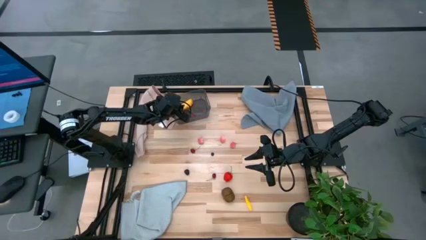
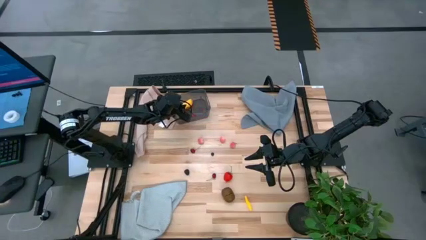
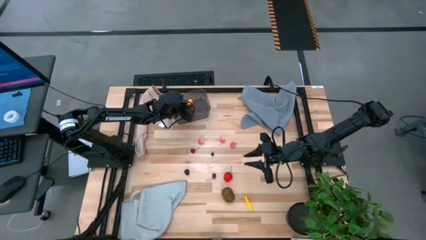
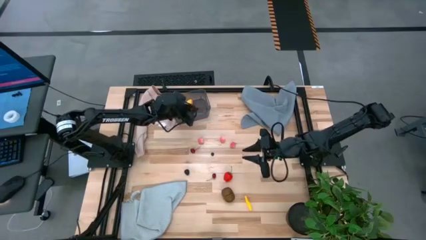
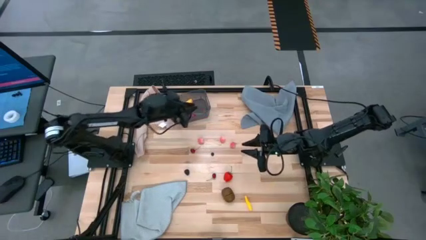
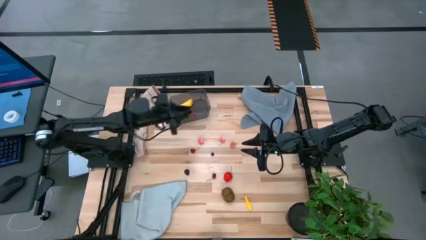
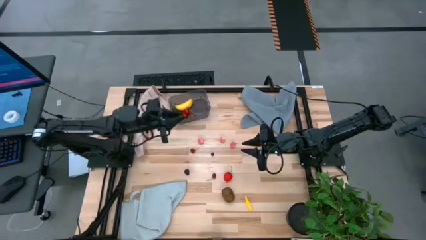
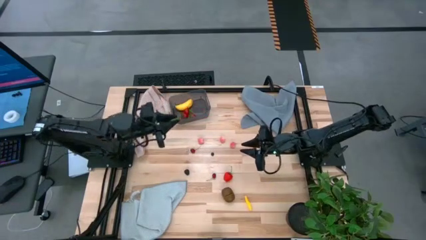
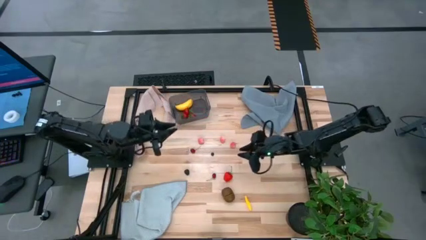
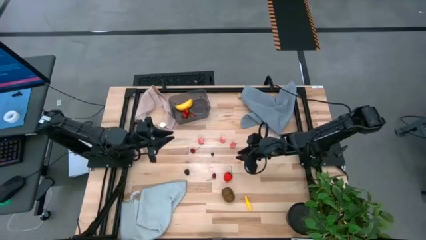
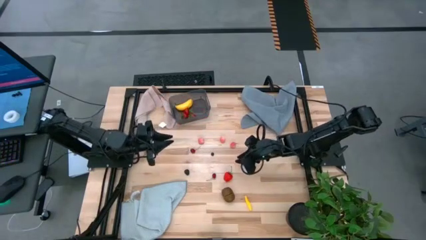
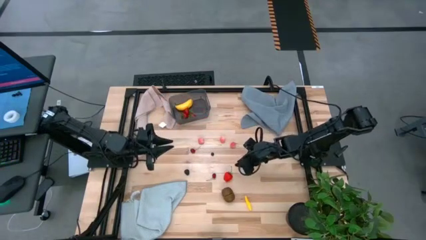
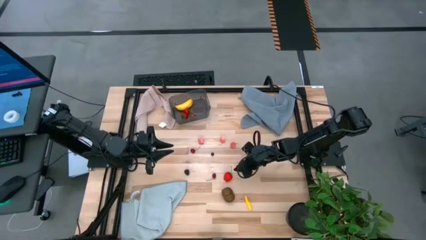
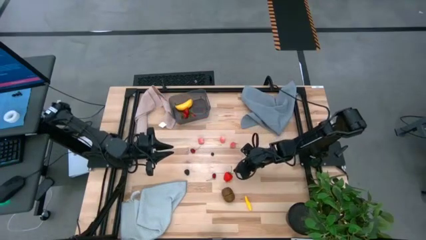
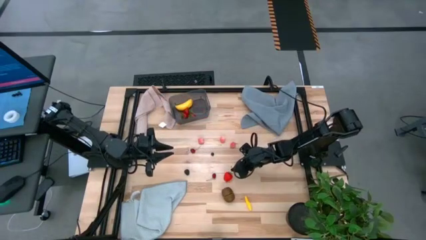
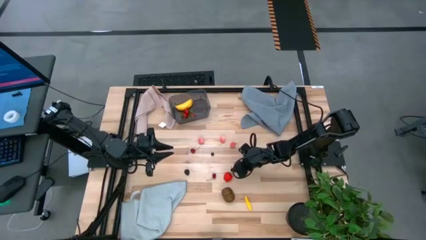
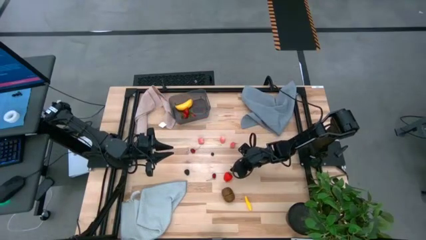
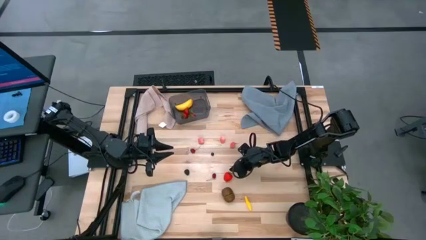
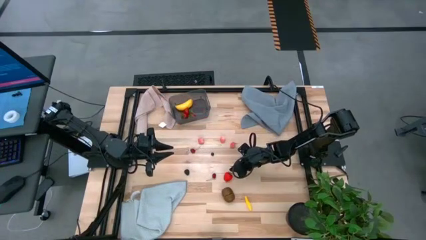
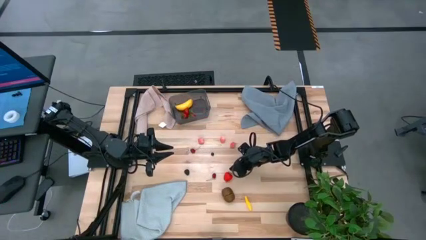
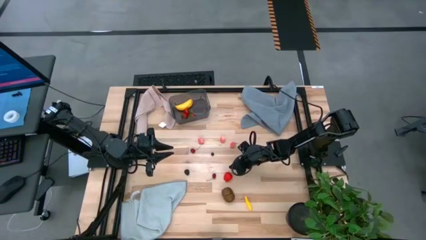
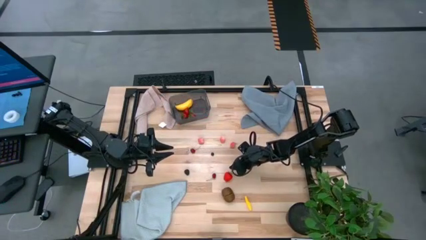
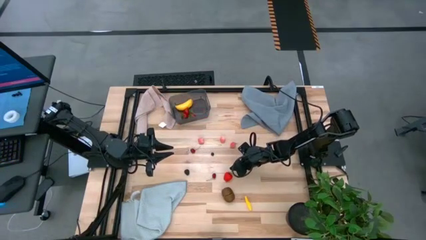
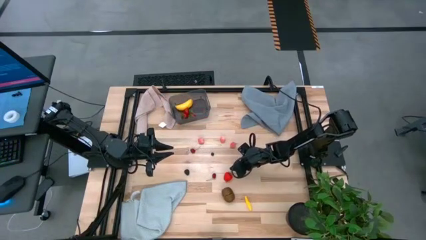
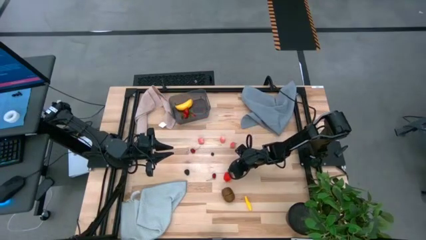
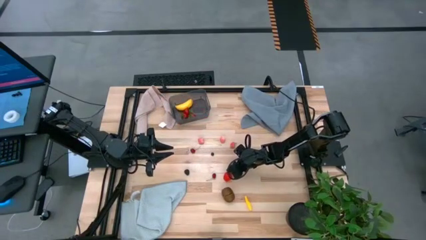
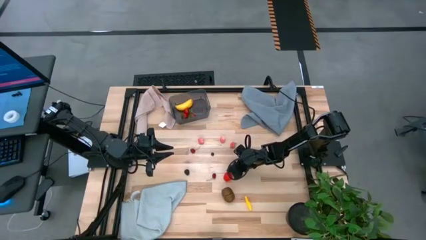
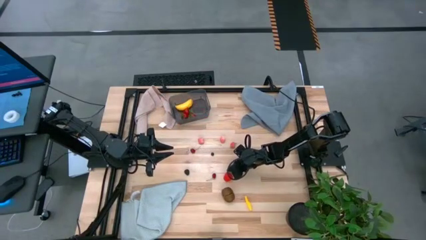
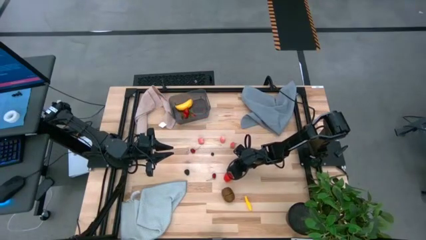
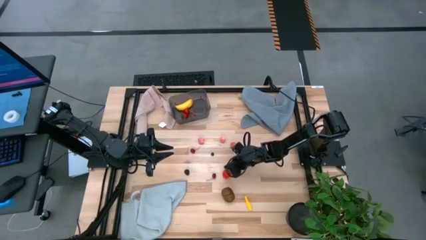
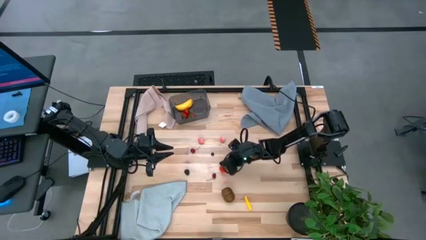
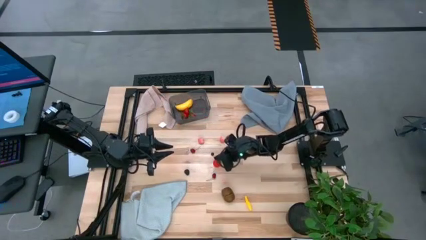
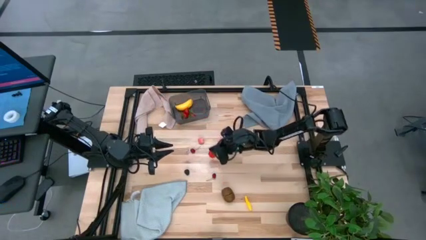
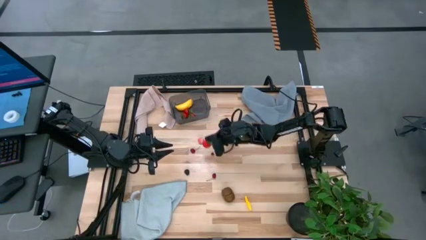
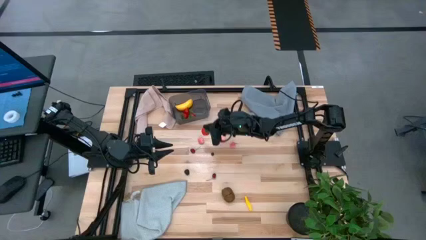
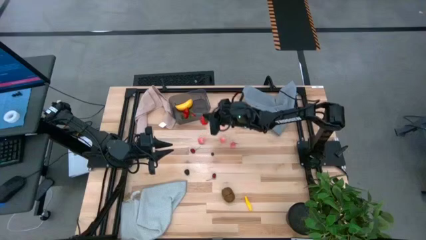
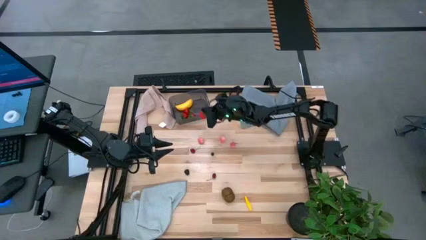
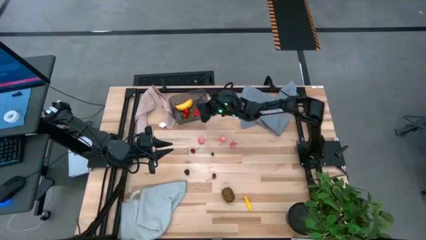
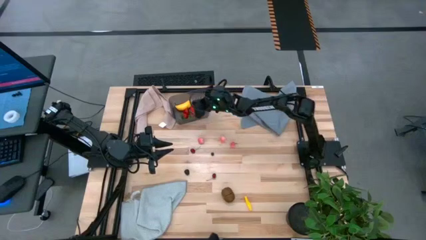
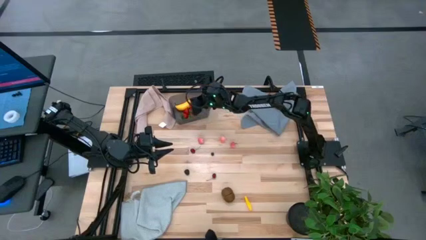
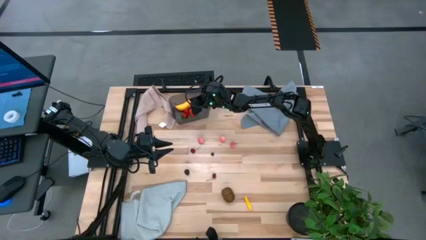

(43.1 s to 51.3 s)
Task: Pick and placing Produce into tupperware
Put the red strawberry into the black bin

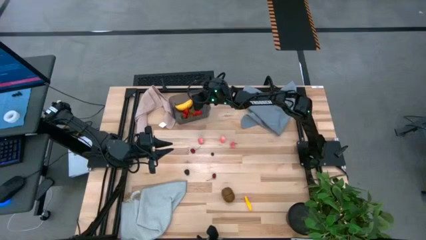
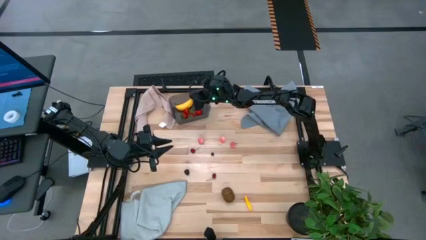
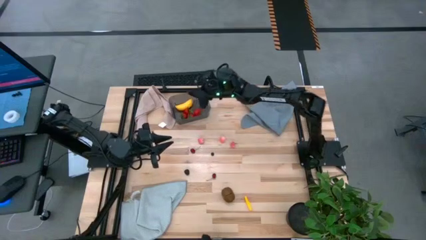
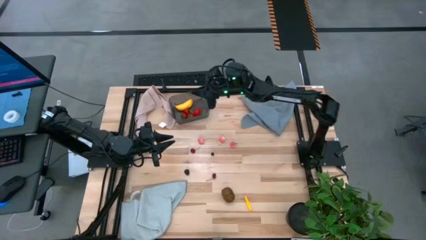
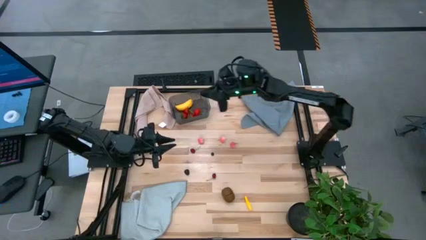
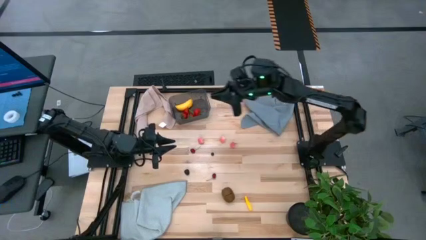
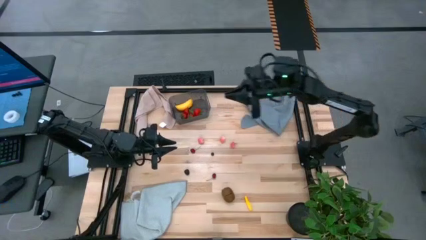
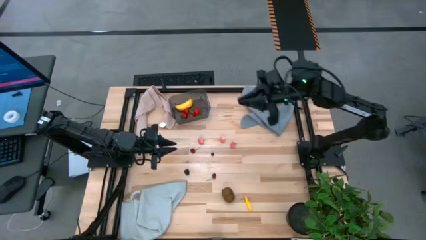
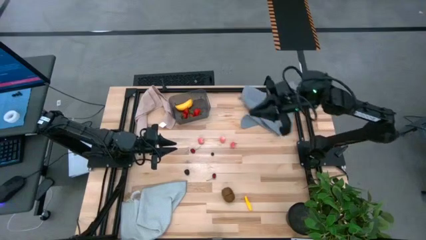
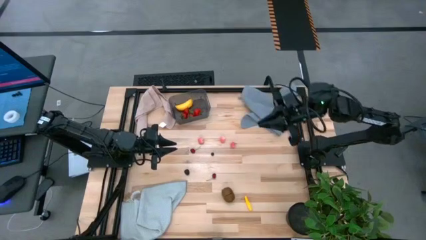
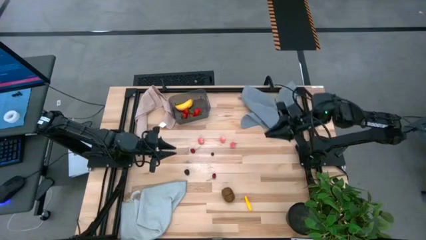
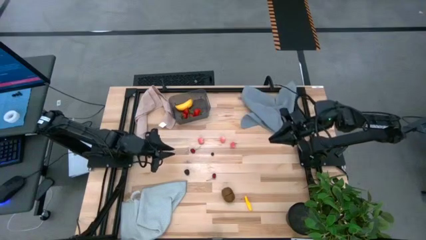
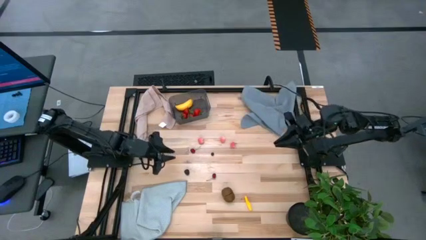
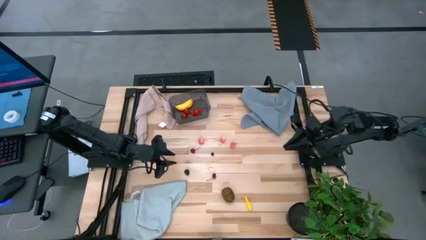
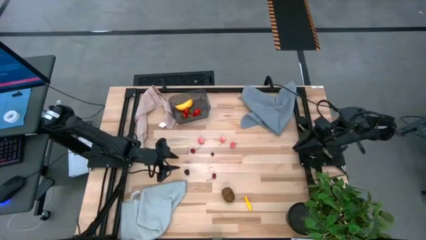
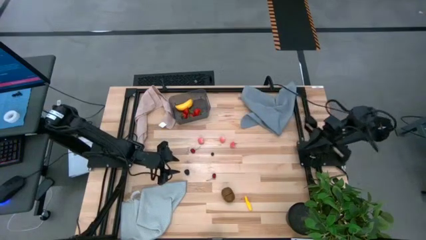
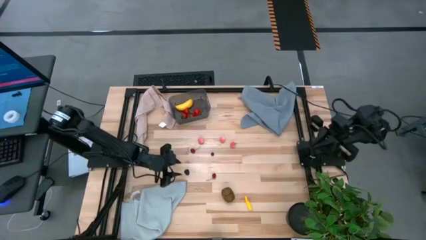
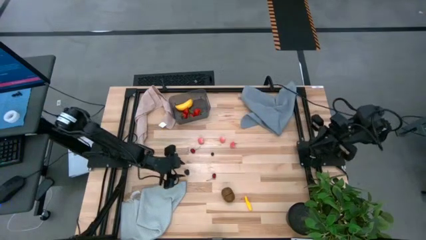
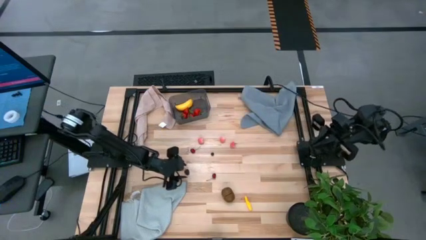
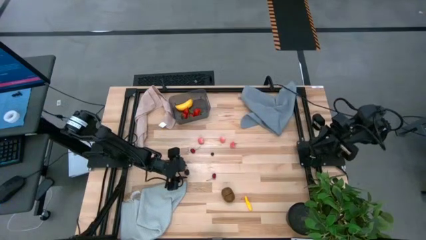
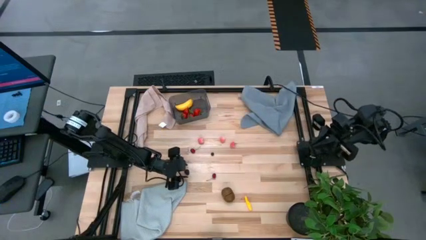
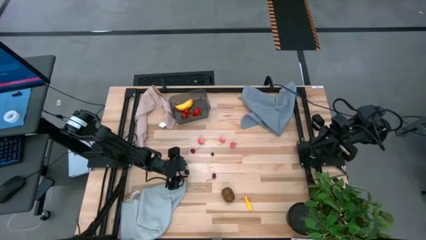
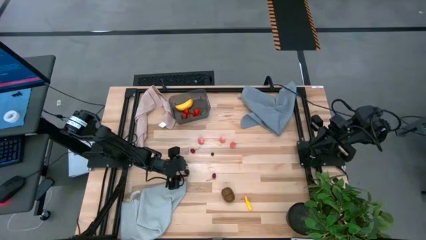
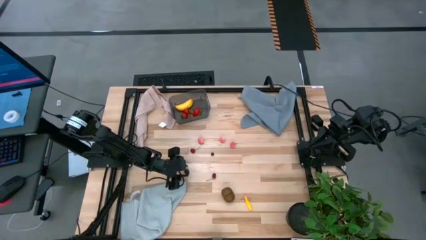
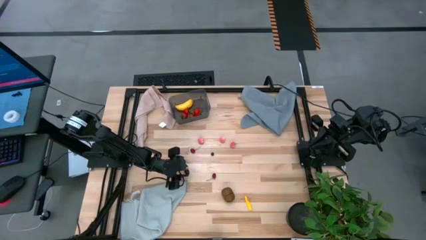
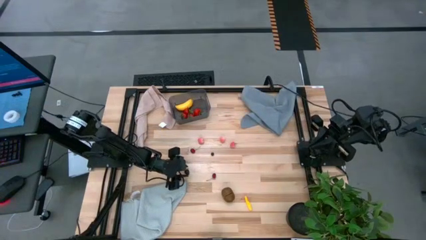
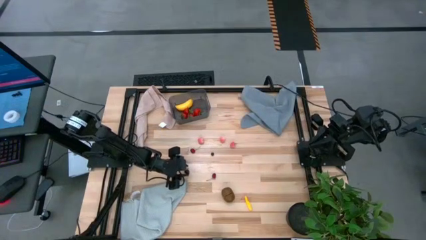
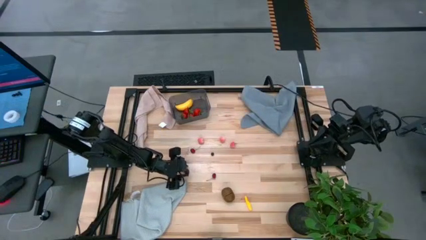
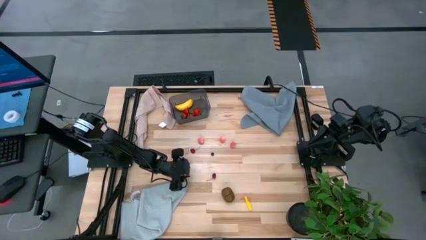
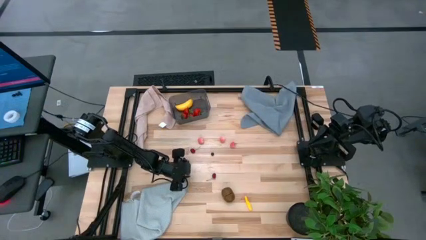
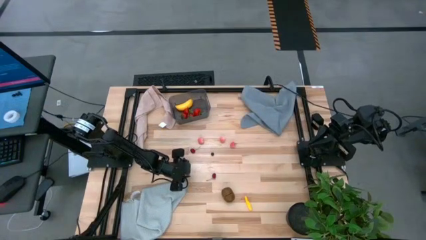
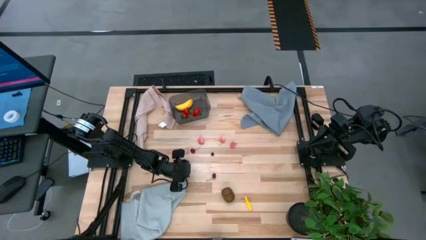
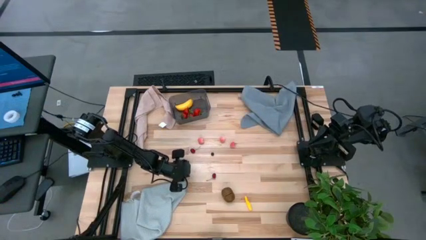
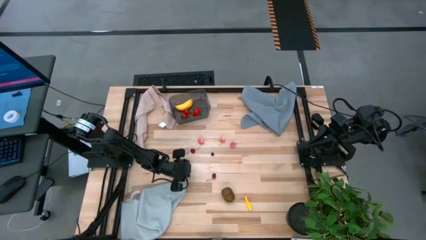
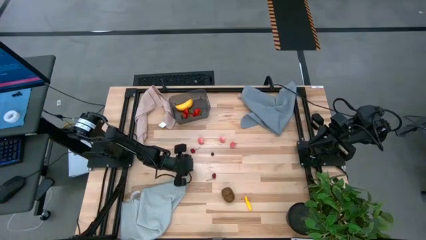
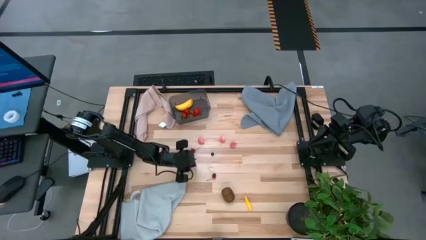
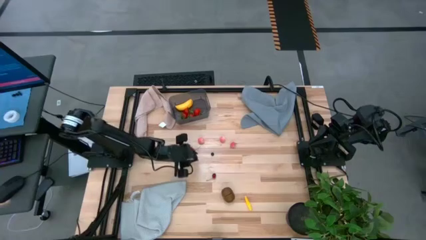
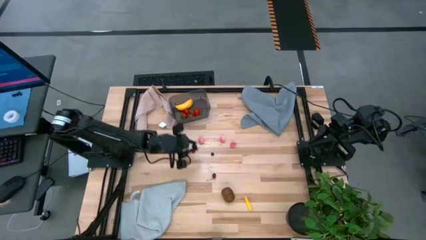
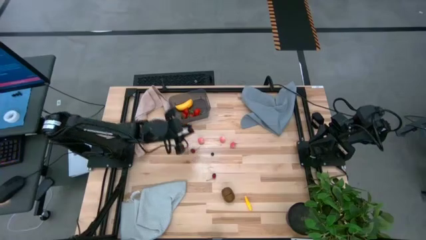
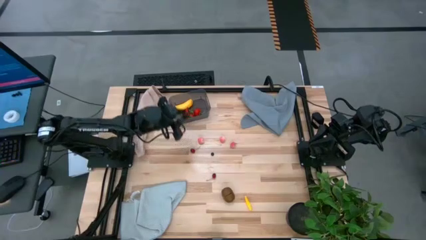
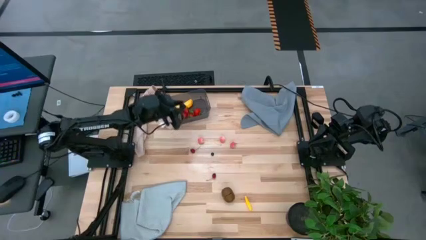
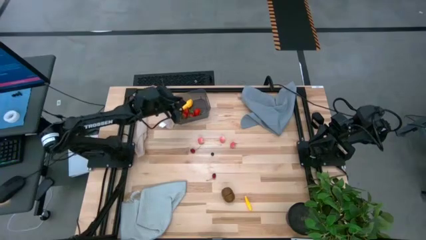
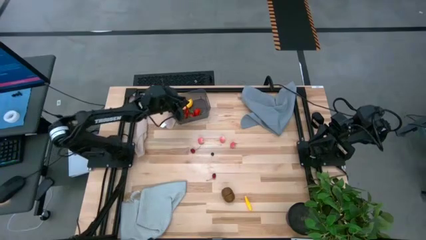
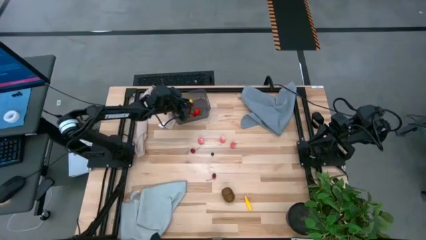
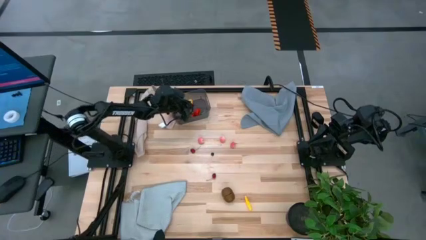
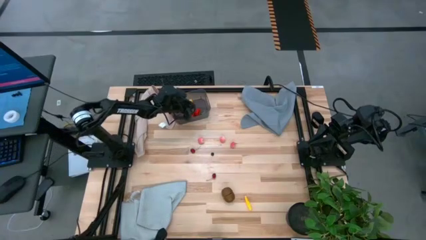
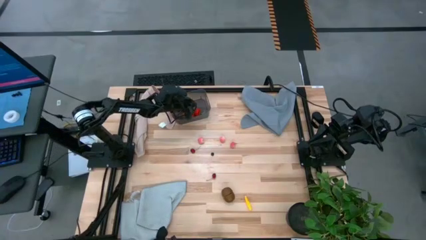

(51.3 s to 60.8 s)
Put the blackberry into the black bin
